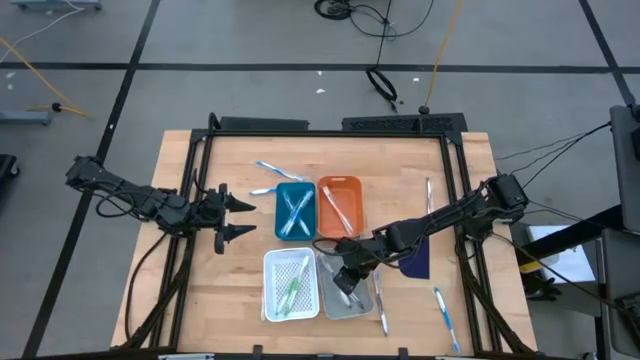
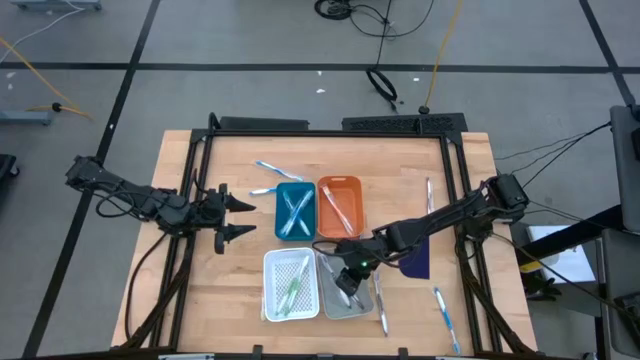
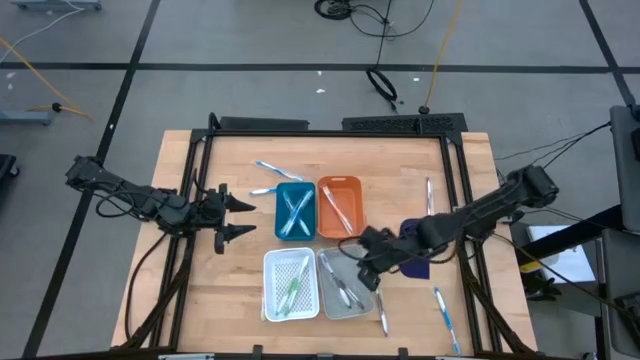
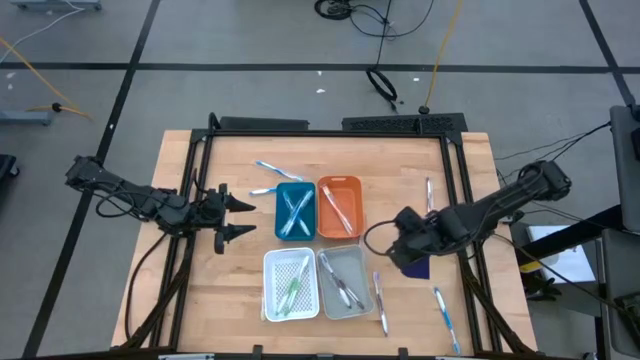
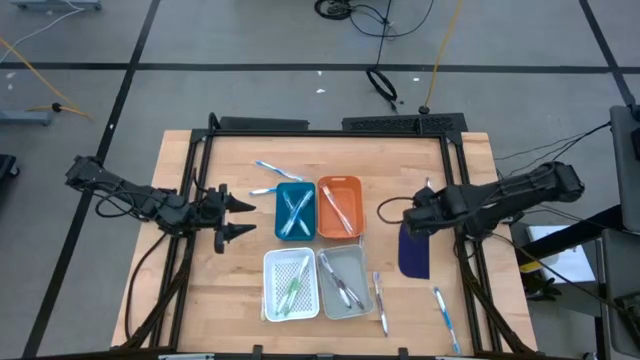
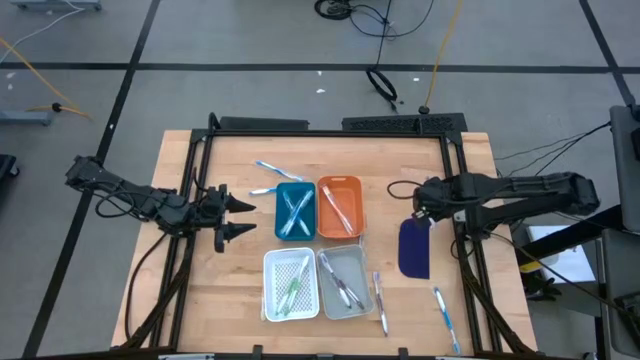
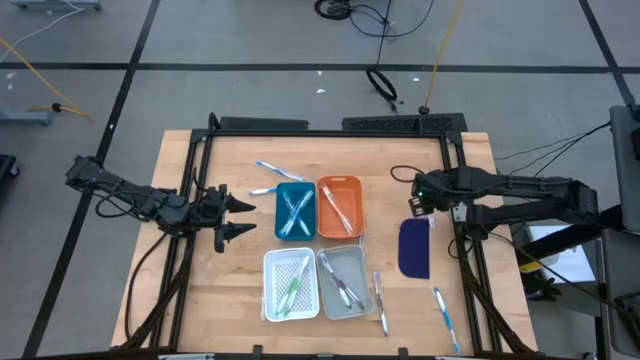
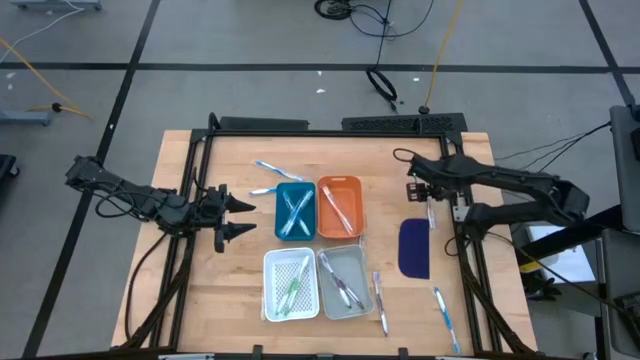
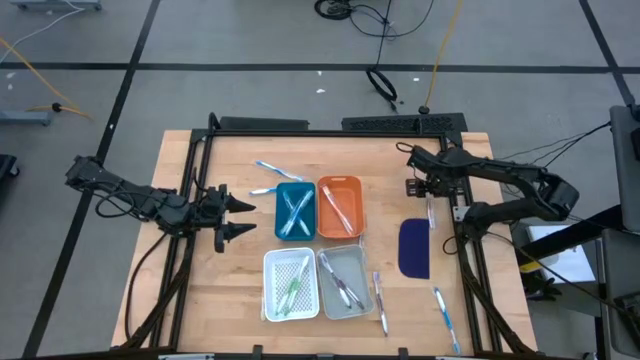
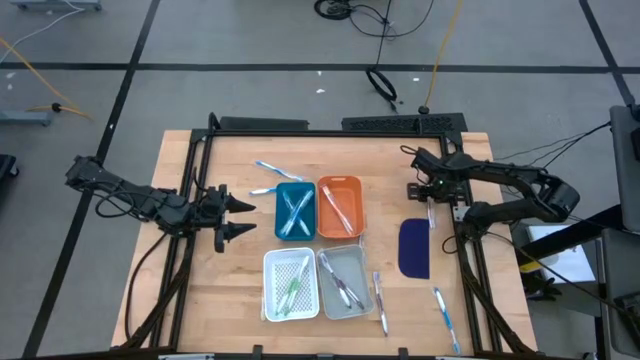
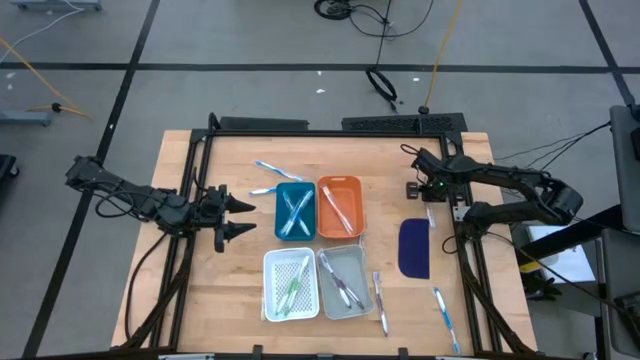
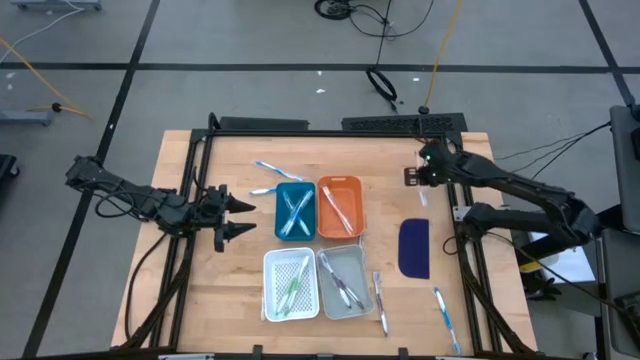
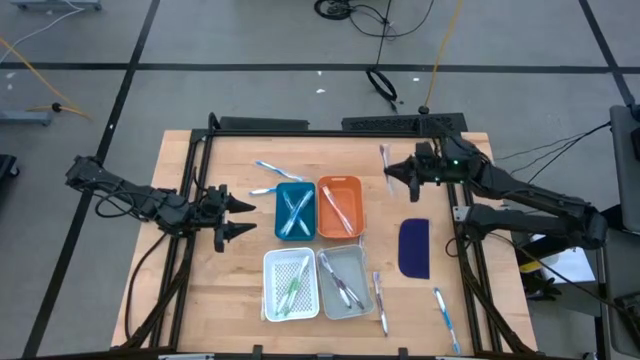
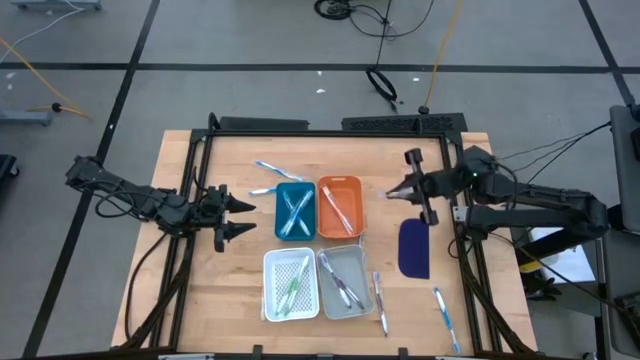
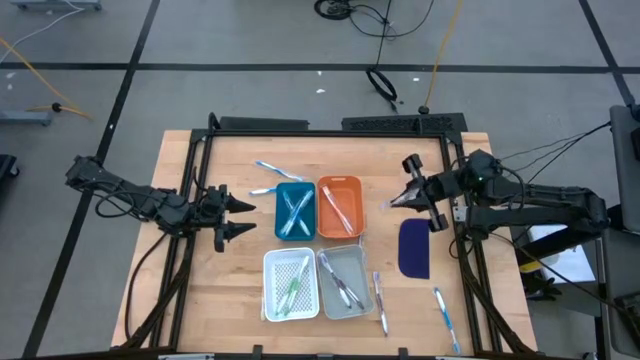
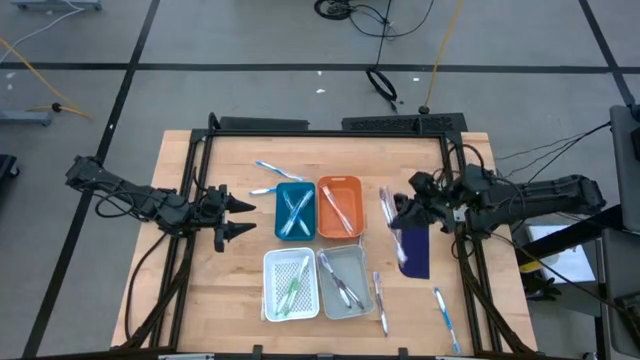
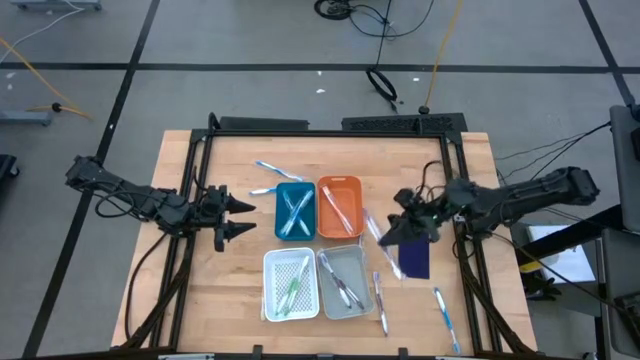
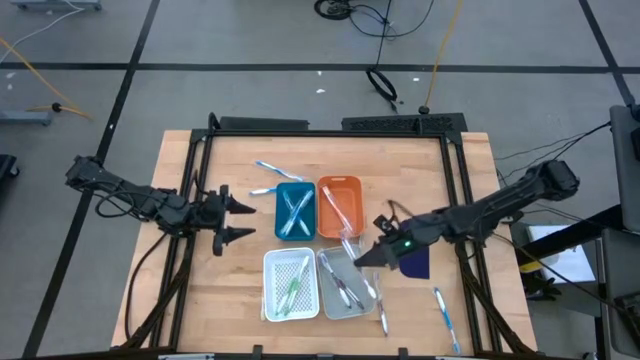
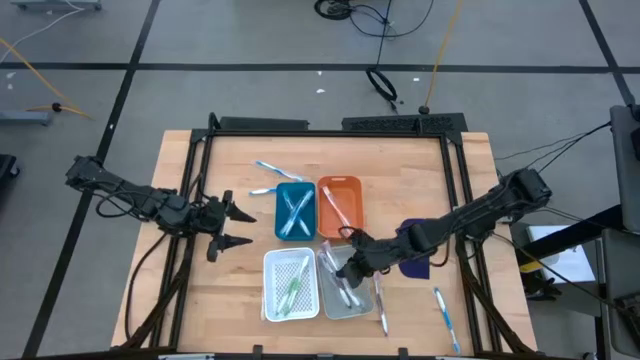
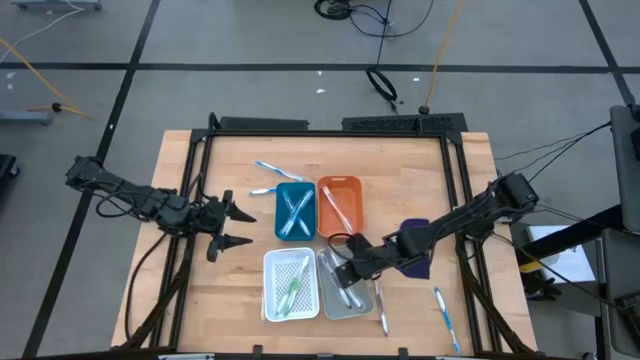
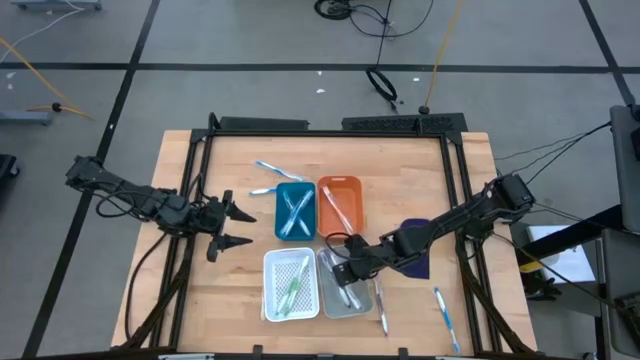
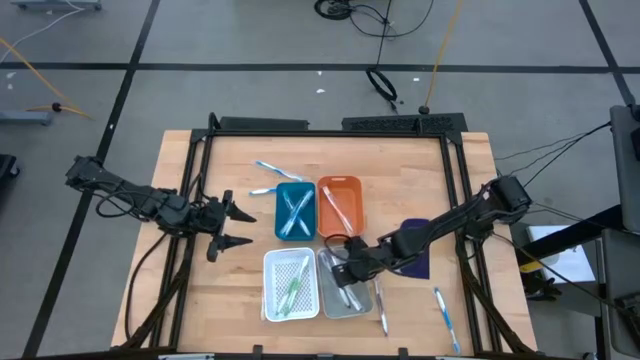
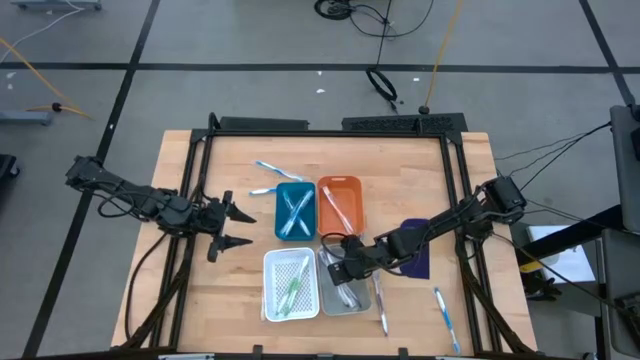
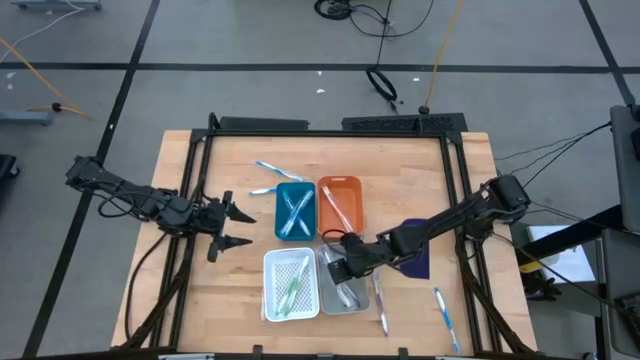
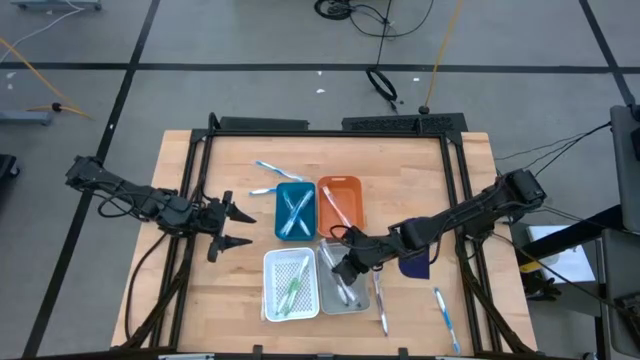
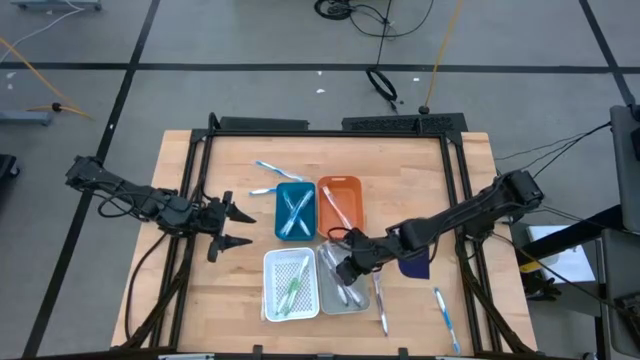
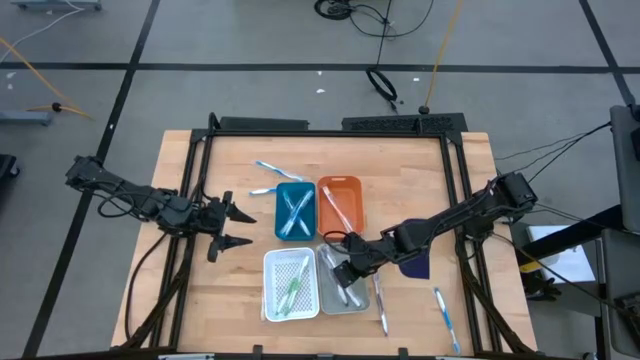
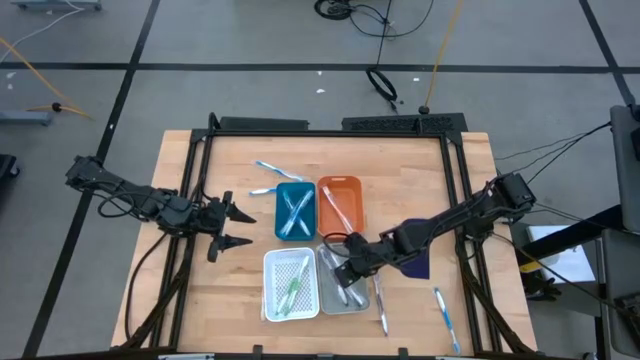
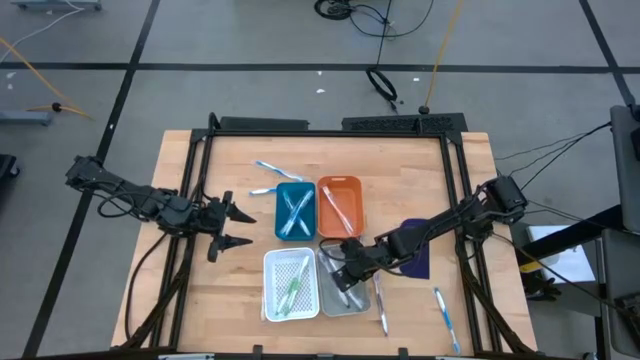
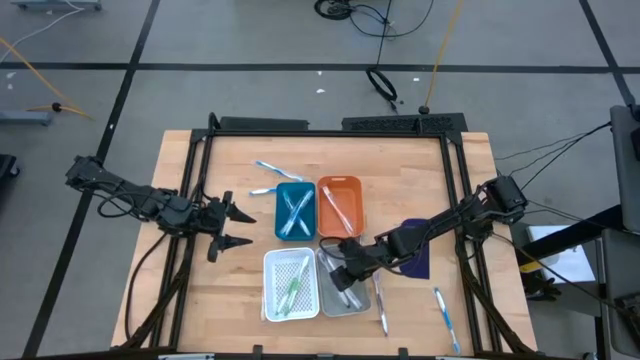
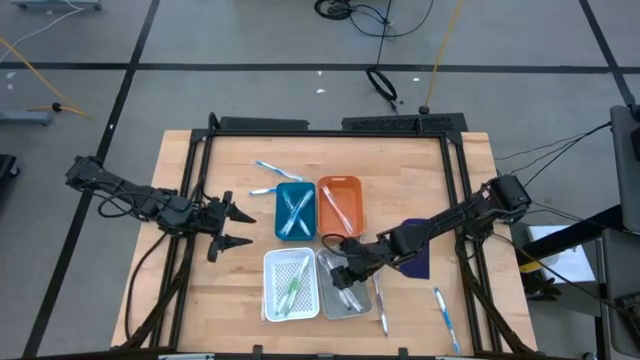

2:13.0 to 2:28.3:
Task: Pick & Place Toothbrushes
Put the purple toothbrush into the gray bin

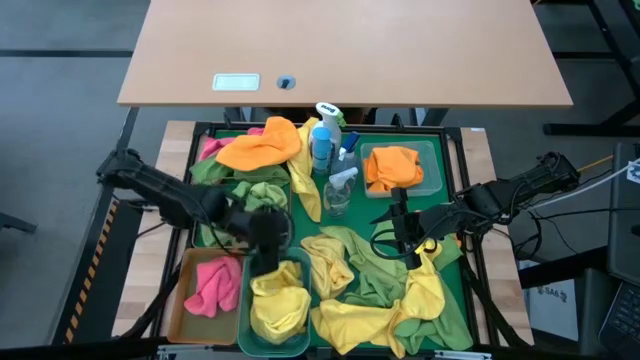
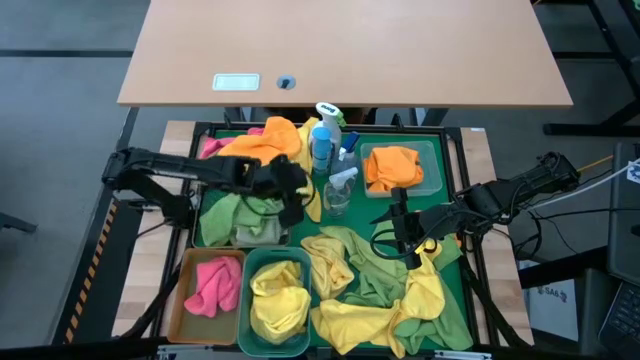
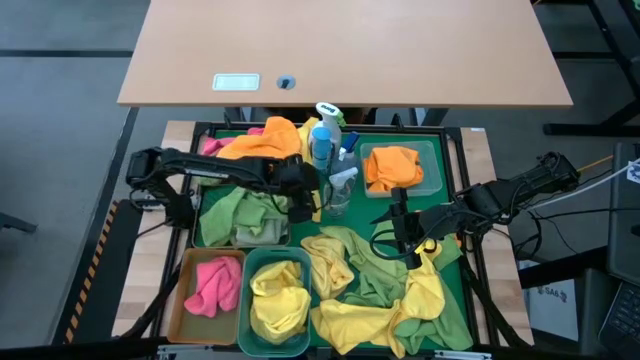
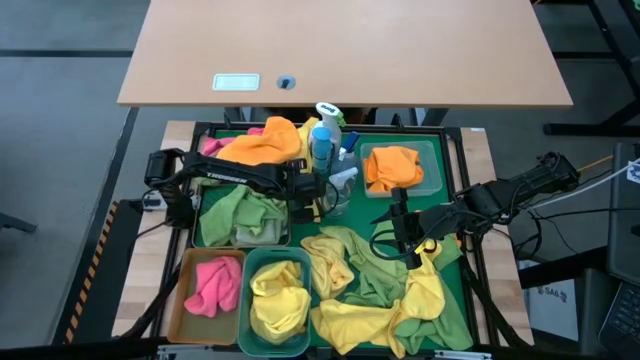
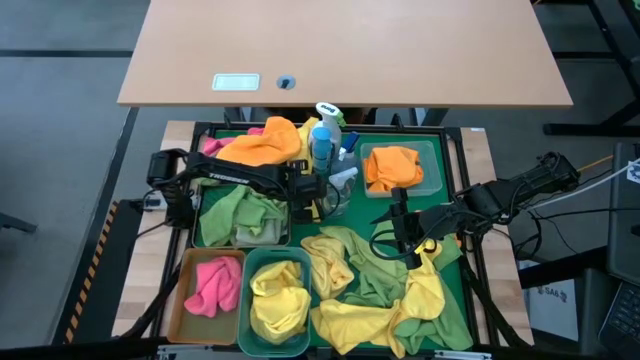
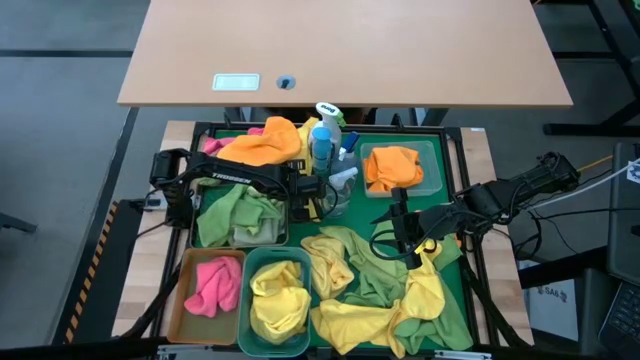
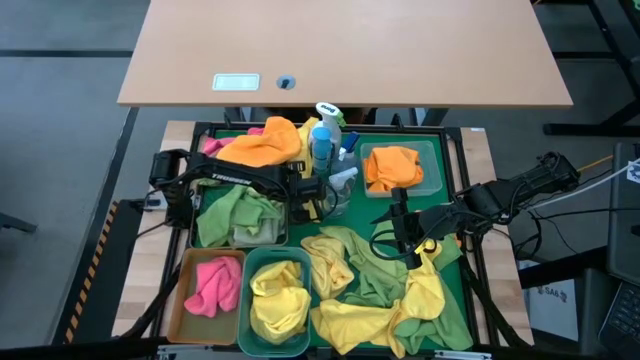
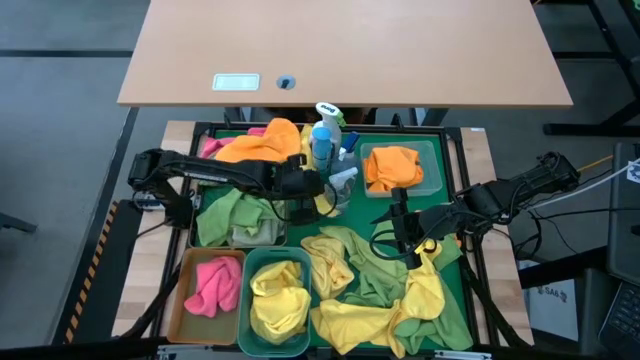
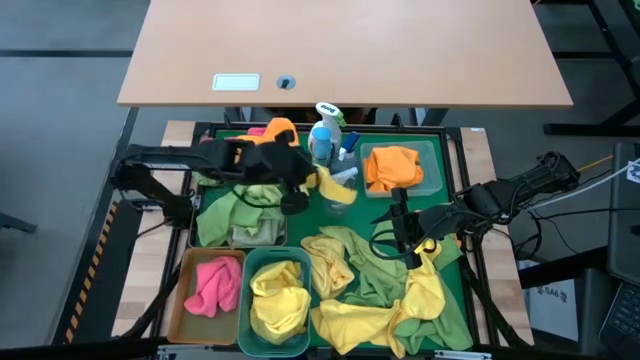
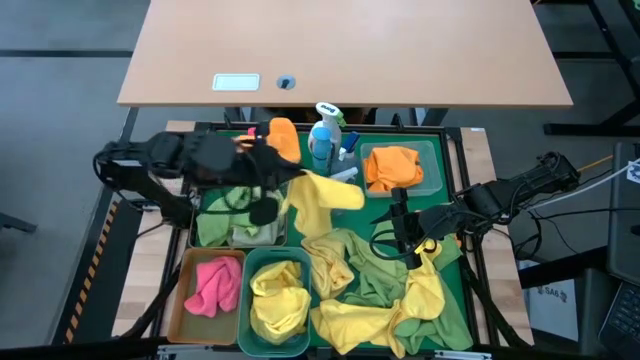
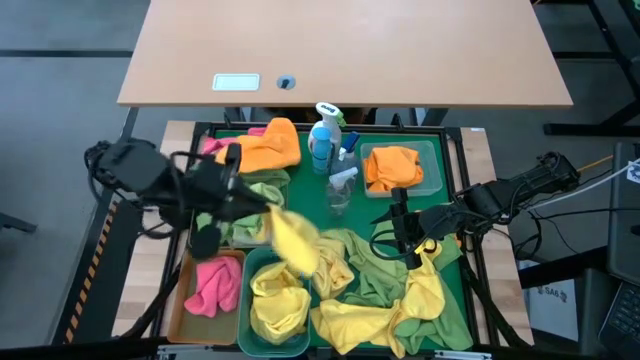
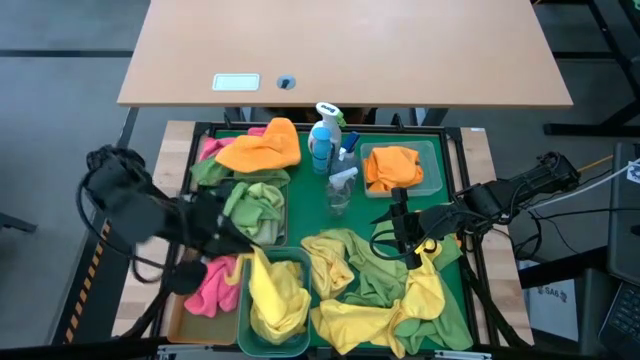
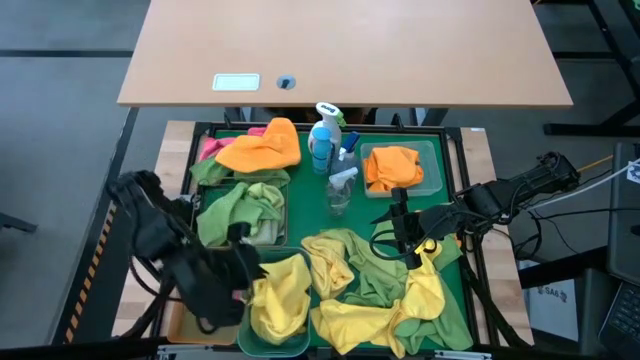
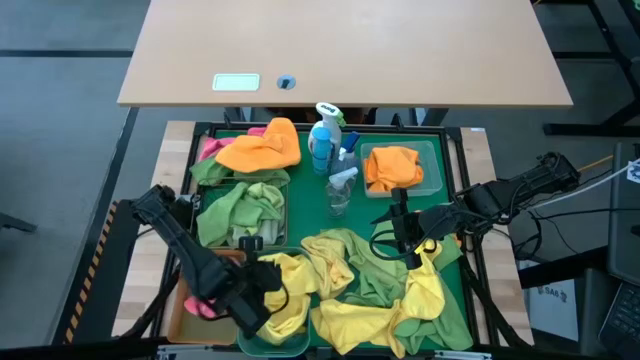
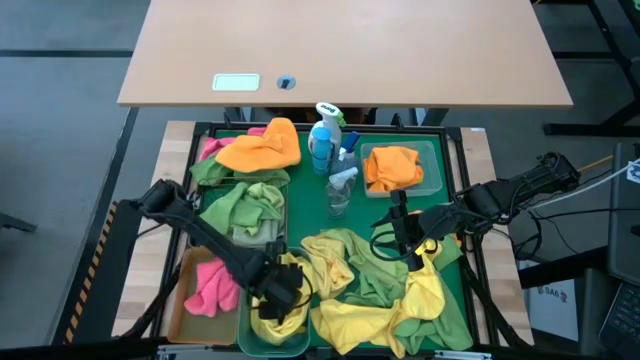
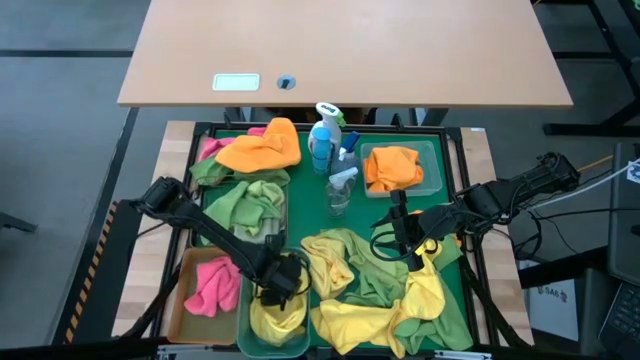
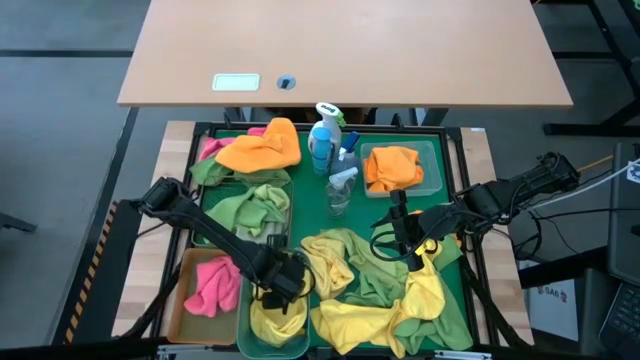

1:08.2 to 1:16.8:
Task: Sort microfiber towel by color & place in baskets
Put the yellow towel into the blue bin
